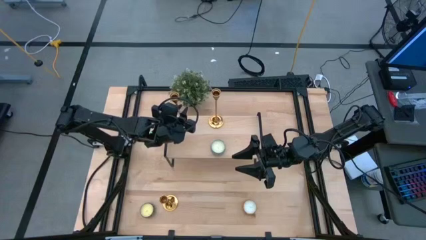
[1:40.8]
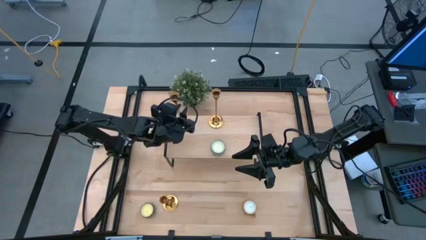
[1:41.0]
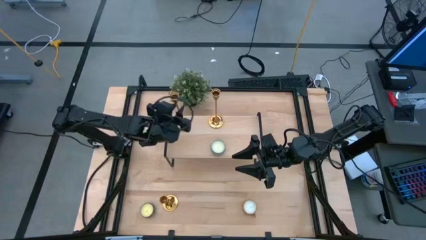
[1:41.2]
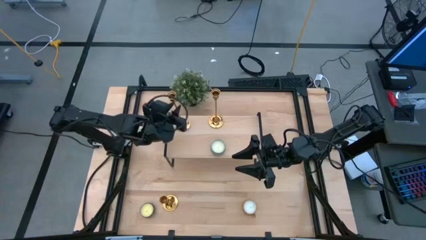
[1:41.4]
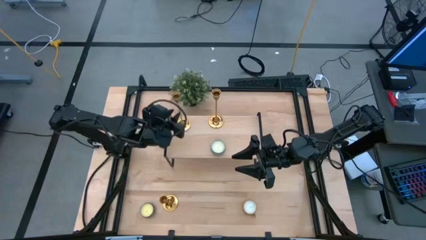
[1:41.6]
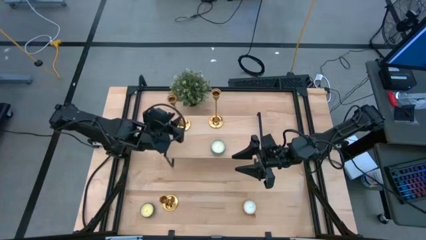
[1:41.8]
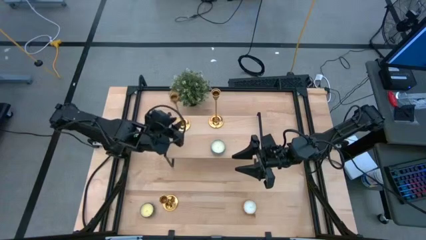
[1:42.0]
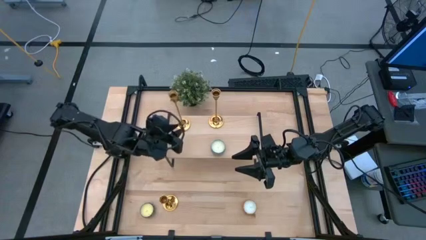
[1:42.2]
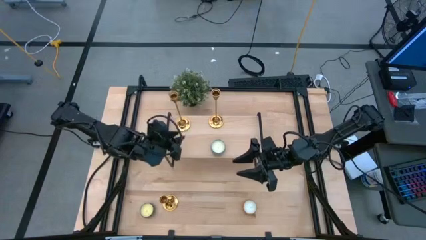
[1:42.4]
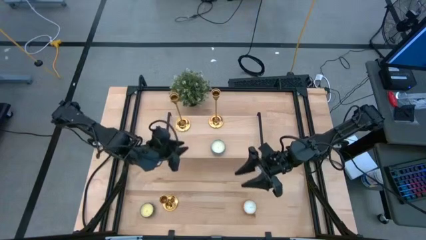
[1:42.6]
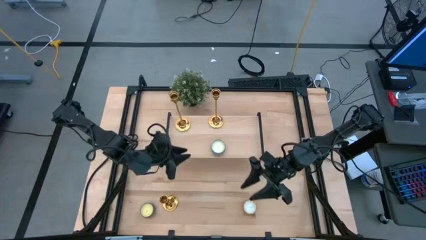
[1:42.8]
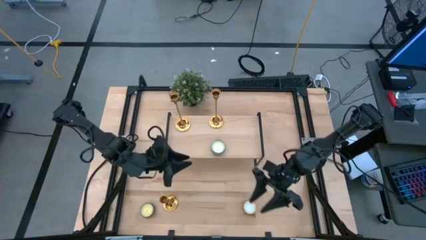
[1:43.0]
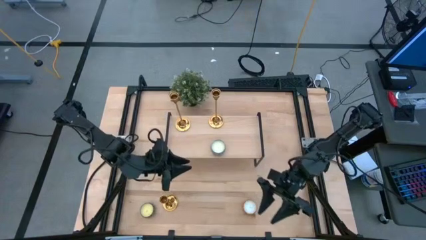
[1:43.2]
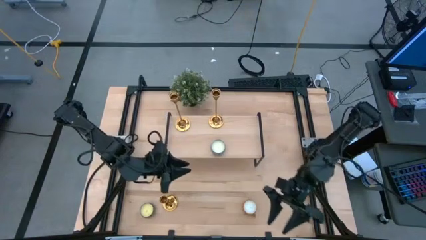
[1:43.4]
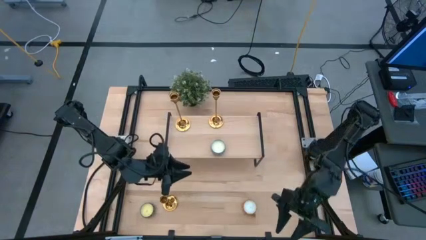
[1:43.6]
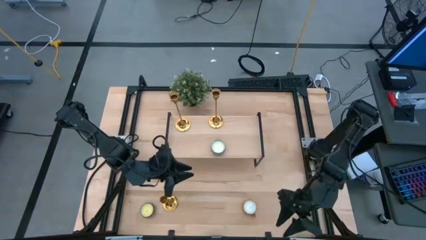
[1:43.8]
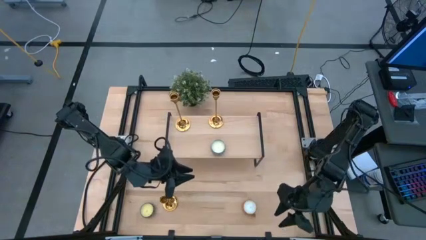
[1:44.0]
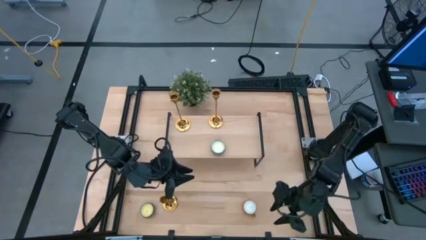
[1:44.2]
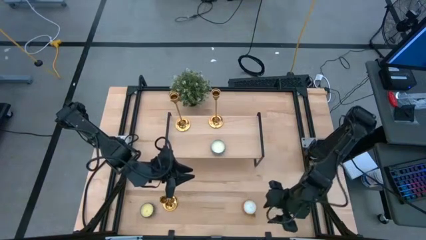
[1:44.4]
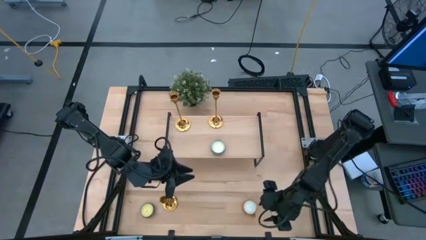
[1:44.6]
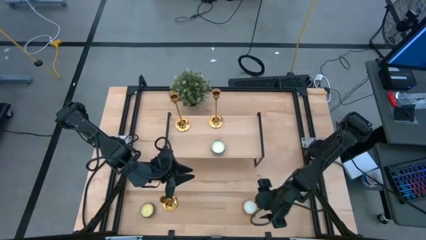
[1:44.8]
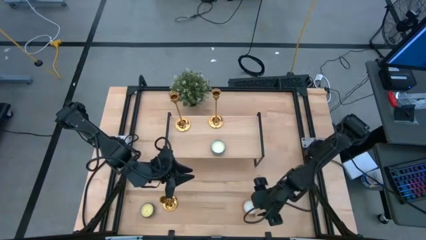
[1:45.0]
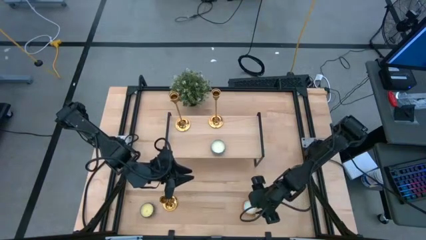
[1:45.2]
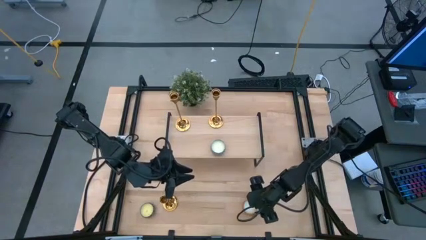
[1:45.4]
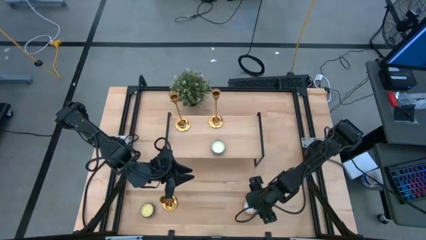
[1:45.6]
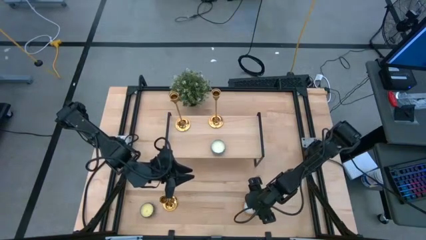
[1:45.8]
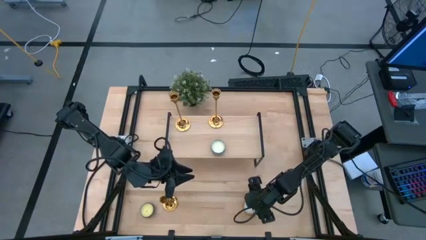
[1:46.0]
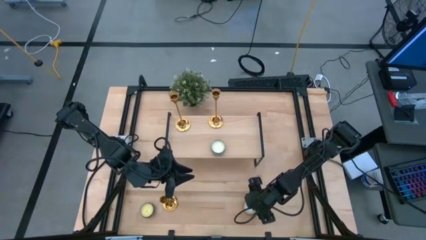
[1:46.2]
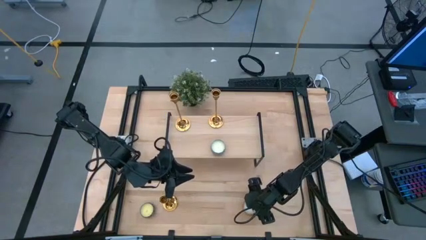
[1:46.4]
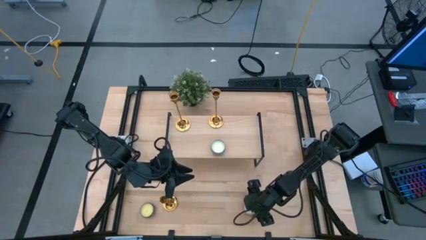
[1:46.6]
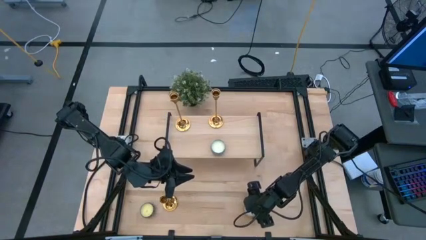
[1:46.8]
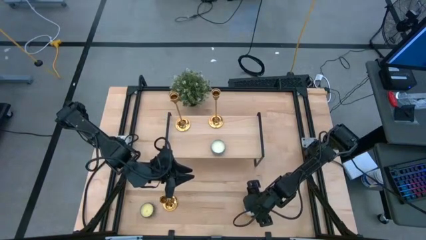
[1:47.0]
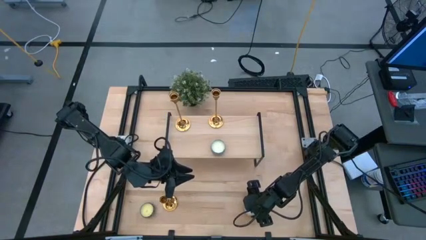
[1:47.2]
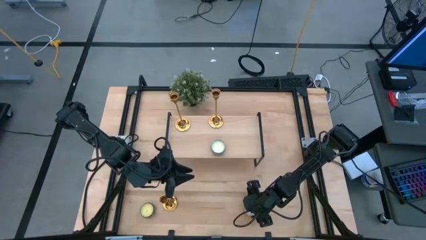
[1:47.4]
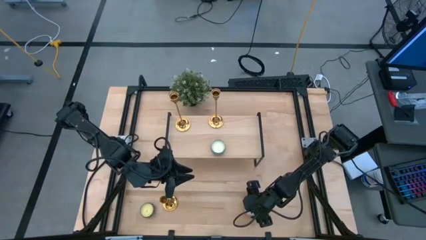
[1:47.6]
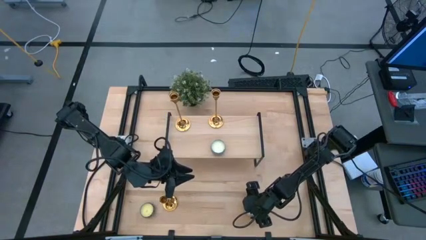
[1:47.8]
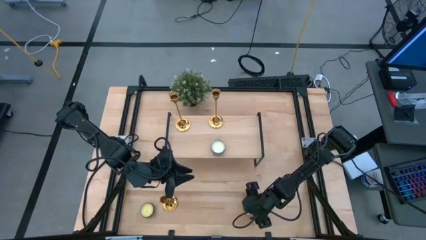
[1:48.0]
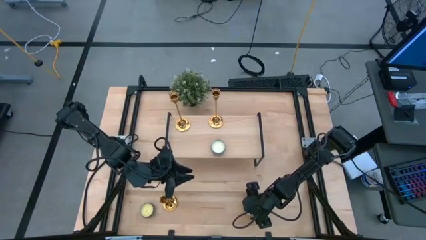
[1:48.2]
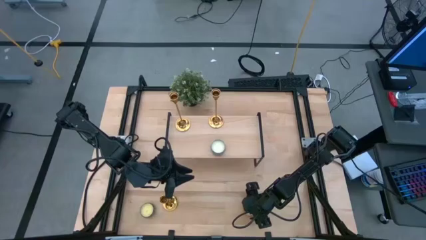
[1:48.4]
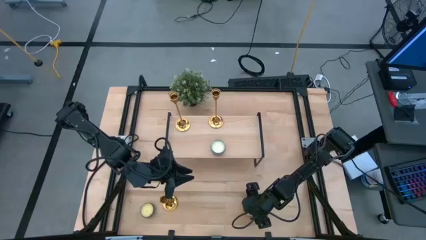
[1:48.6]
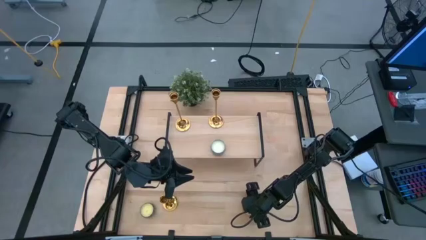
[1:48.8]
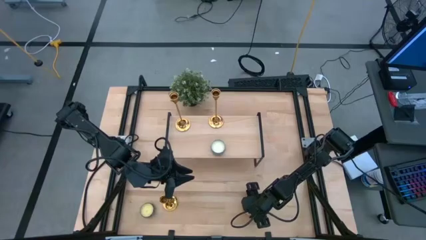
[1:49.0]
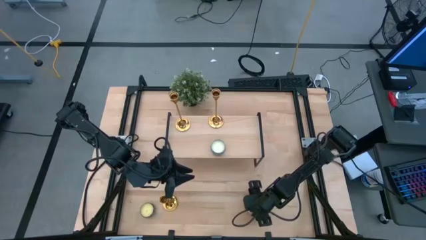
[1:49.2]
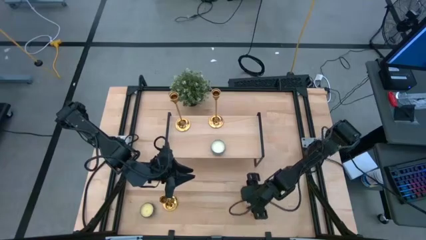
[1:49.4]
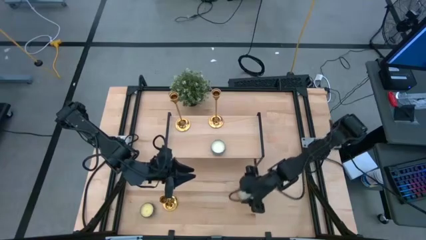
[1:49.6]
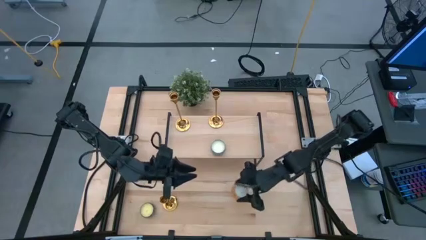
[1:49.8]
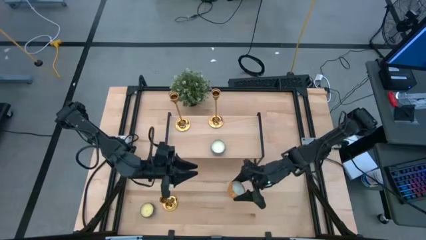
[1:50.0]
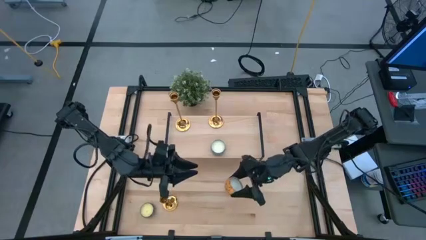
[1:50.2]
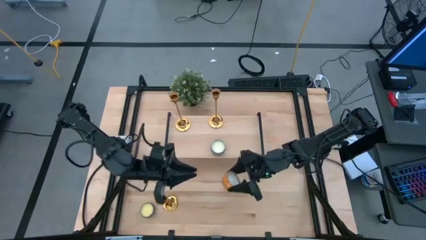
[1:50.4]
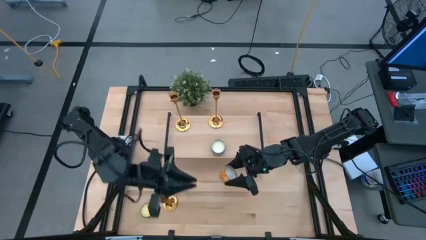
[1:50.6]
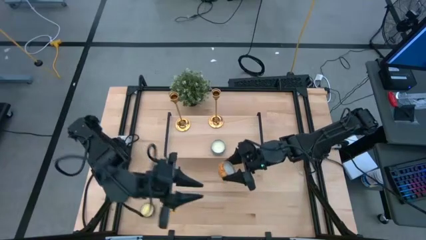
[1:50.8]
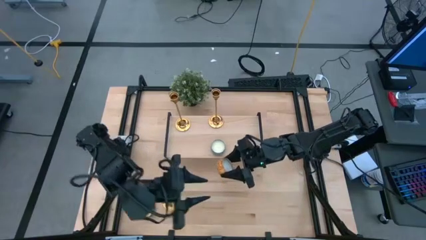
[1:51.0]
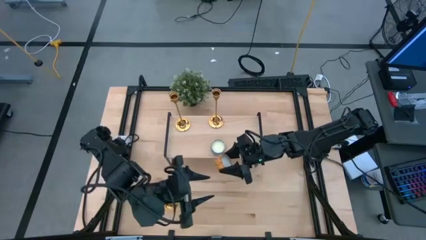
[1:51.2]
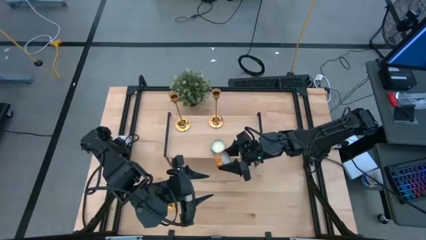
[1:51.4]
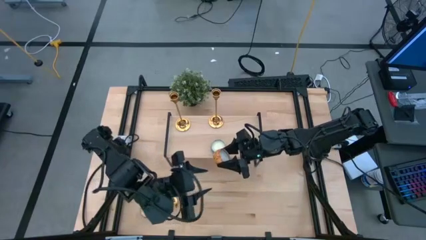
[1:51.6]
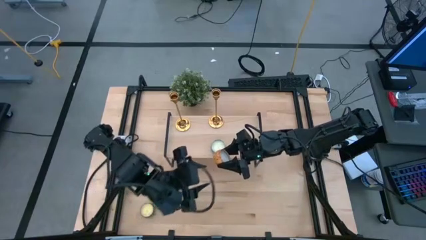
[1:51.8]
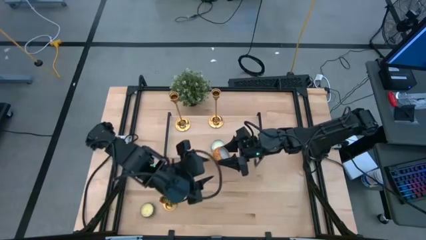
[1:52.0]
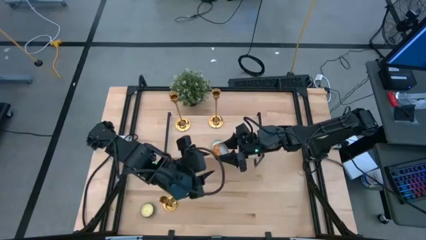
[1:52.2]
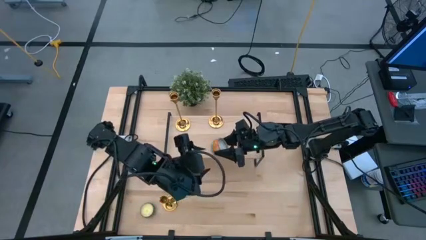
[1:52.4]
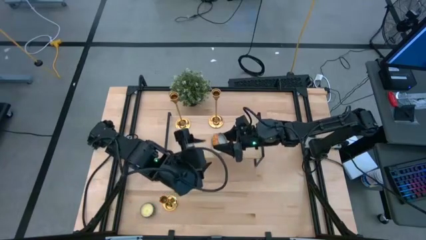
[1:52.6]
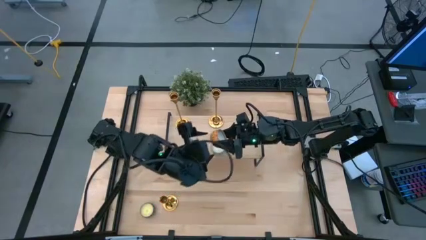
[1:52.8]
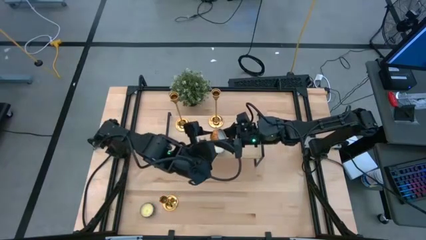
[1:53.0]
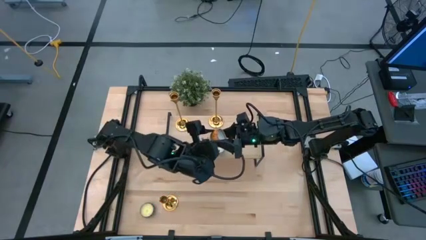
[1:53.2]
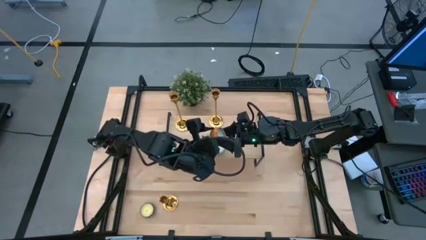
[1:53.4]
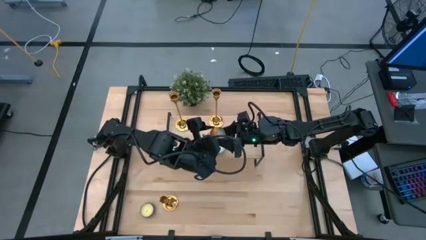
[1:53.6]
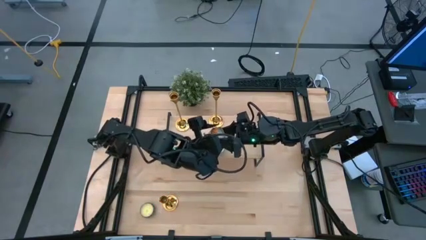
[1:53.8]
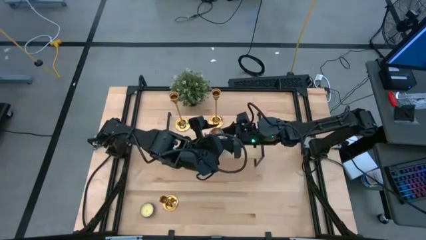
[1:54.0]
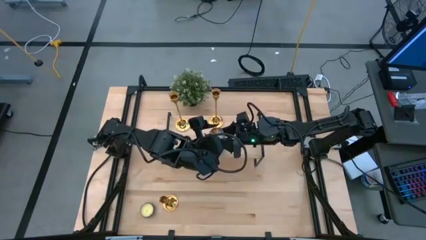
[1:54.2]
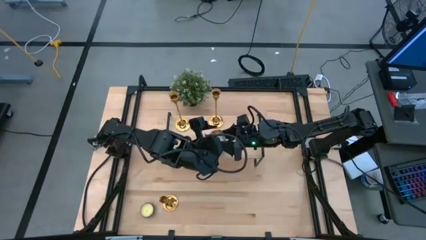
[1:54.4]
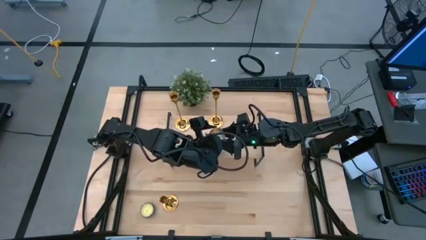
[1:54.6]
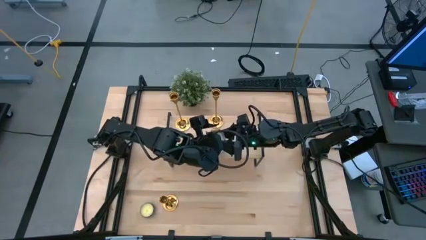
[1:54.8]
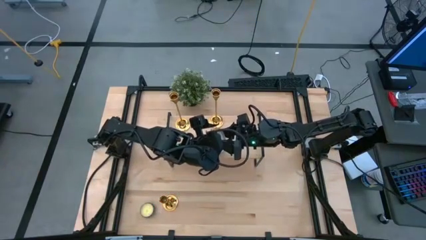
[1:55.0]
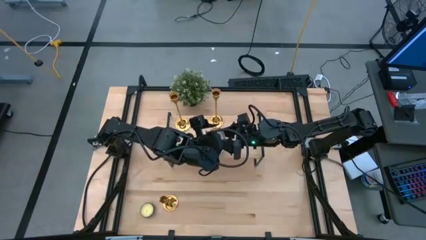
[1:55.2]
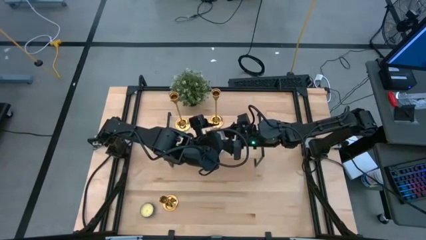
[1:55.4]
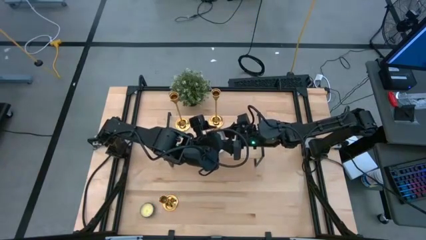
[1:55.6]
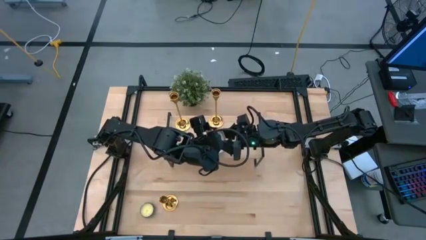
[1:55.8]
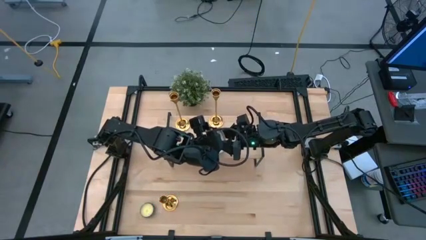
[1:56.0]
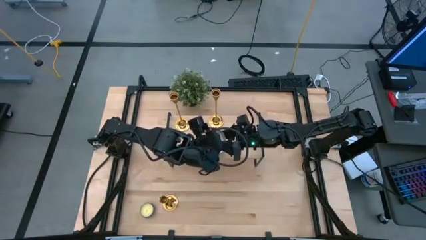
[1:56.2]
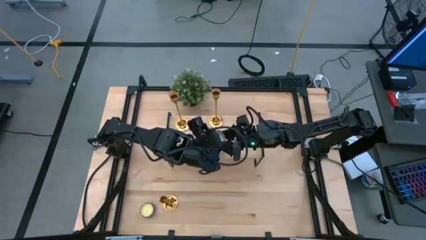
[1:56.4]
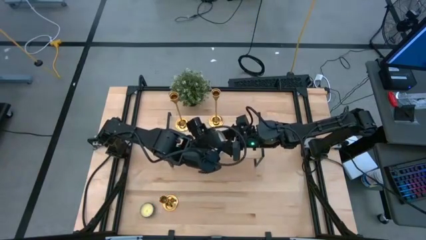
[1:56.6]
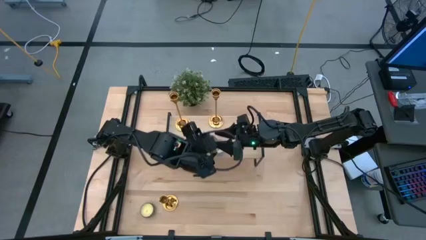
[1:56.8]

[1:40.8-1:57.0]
Task: Stock candles and holders on shelf
Align the orange scented candle with the other scented candle on the shelf
